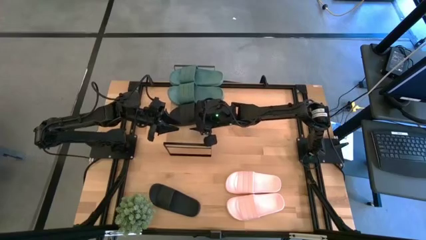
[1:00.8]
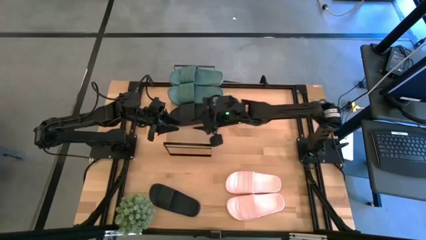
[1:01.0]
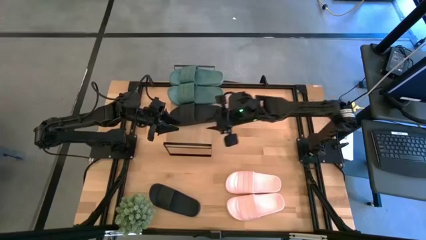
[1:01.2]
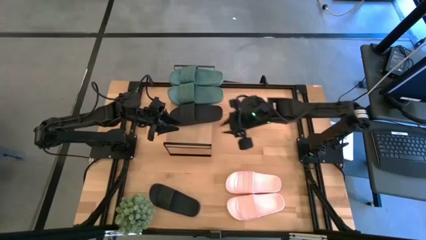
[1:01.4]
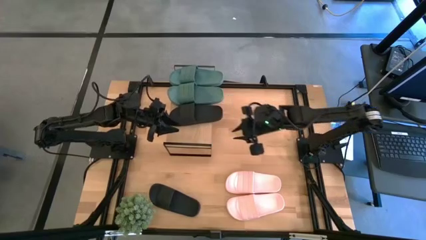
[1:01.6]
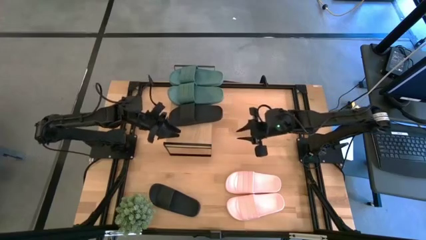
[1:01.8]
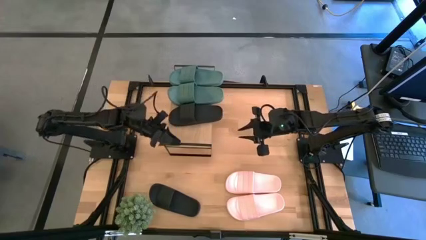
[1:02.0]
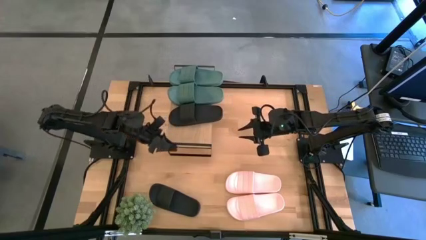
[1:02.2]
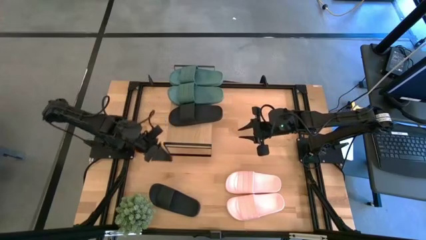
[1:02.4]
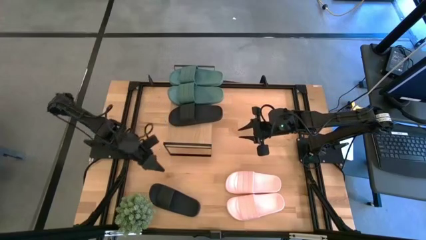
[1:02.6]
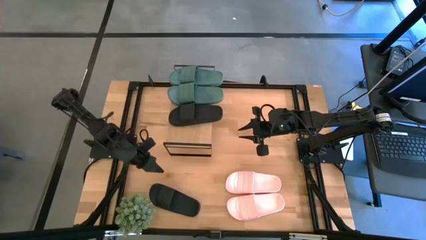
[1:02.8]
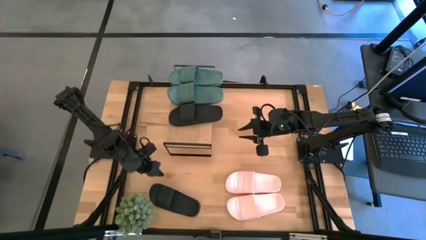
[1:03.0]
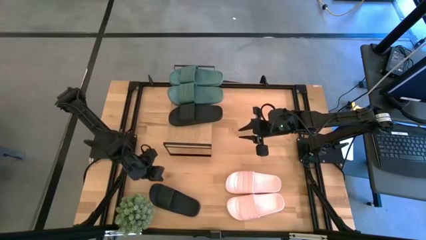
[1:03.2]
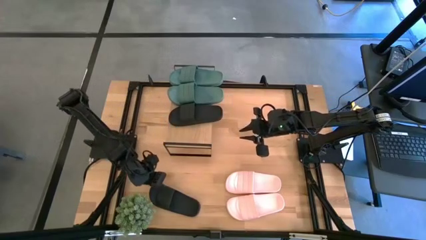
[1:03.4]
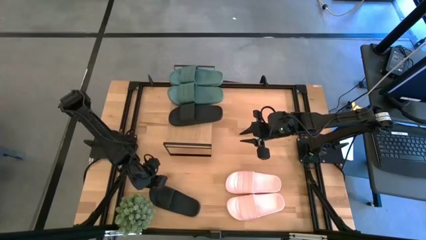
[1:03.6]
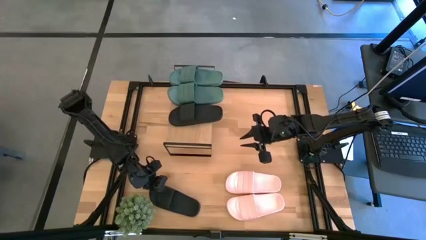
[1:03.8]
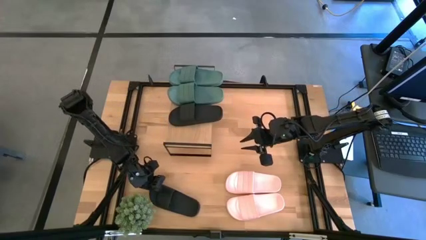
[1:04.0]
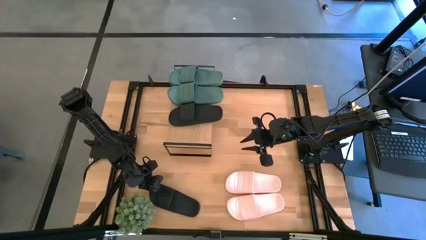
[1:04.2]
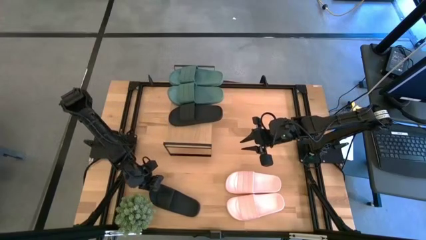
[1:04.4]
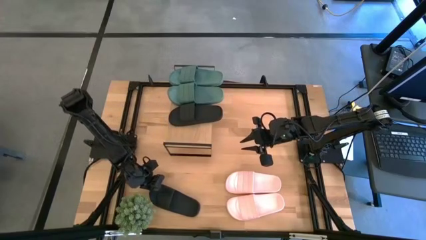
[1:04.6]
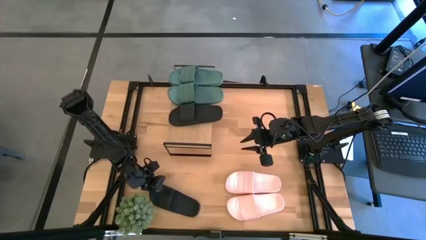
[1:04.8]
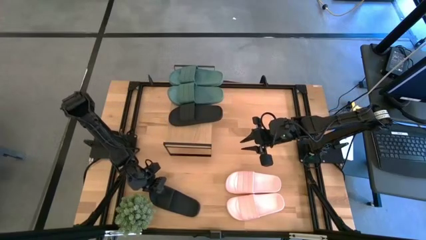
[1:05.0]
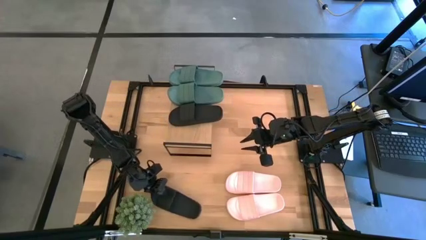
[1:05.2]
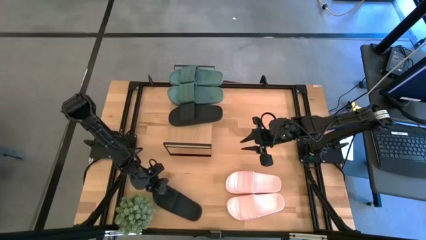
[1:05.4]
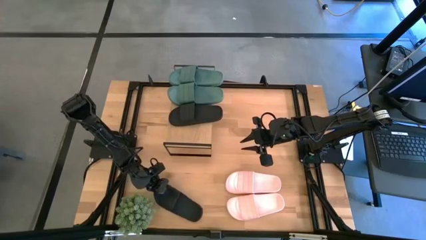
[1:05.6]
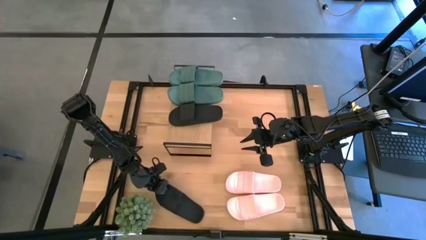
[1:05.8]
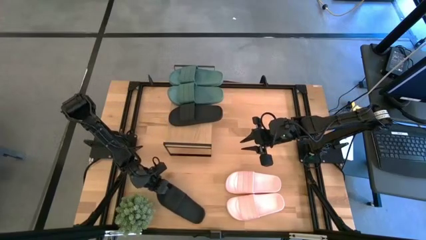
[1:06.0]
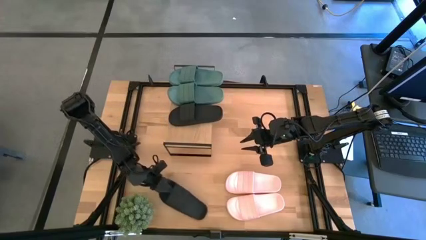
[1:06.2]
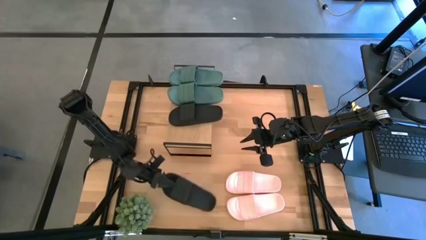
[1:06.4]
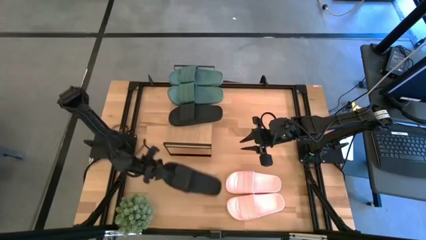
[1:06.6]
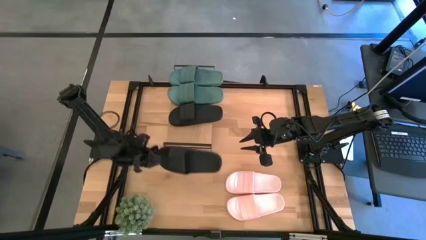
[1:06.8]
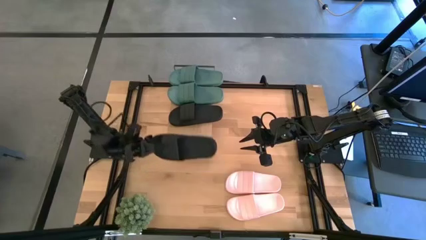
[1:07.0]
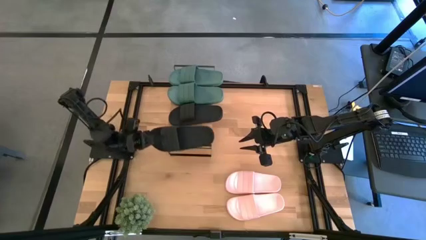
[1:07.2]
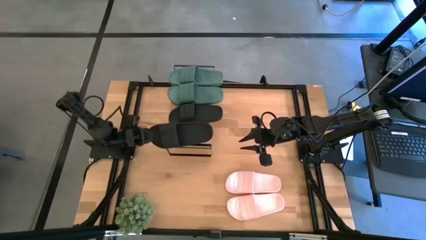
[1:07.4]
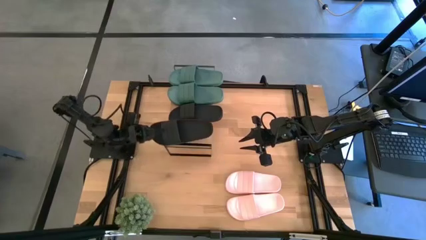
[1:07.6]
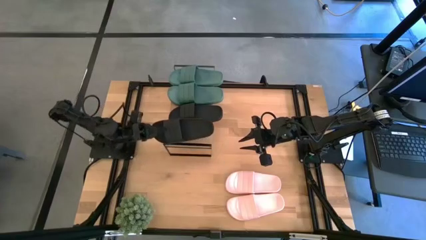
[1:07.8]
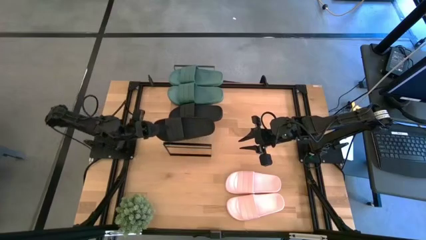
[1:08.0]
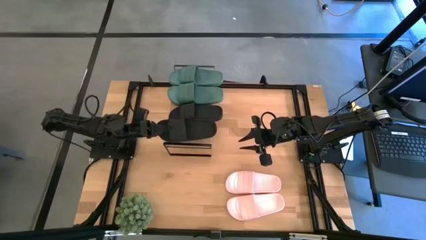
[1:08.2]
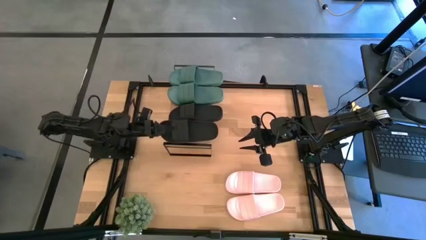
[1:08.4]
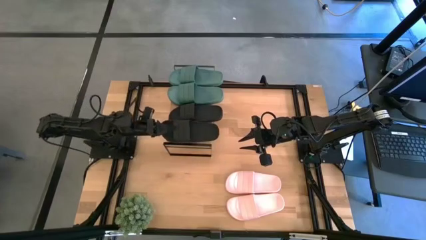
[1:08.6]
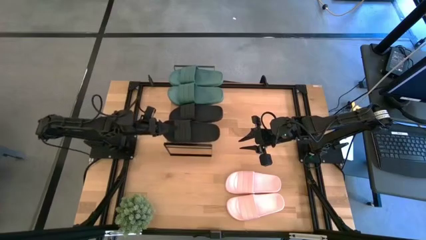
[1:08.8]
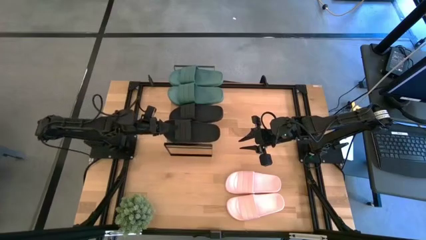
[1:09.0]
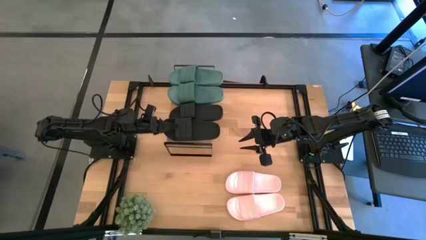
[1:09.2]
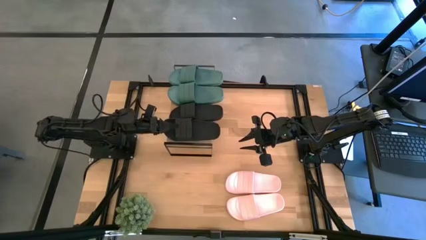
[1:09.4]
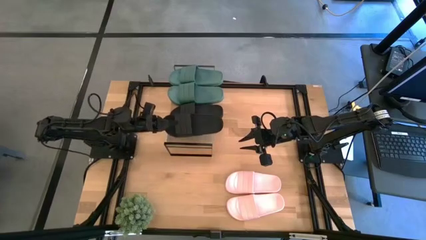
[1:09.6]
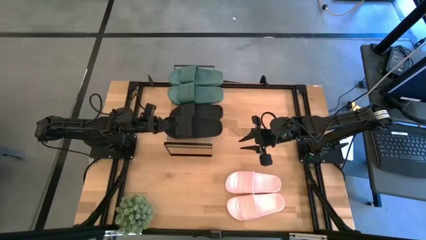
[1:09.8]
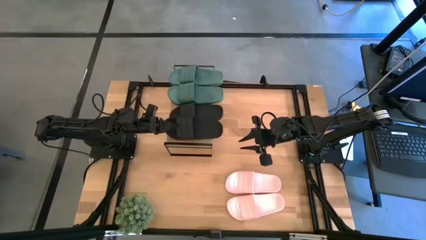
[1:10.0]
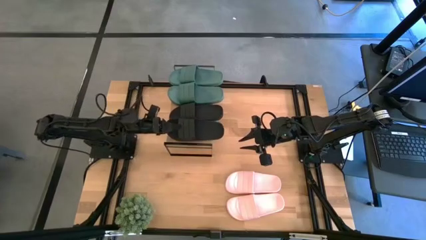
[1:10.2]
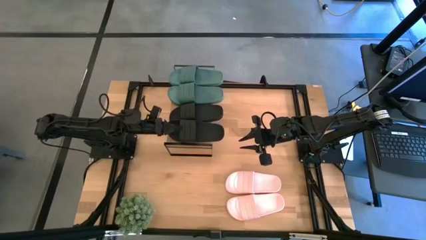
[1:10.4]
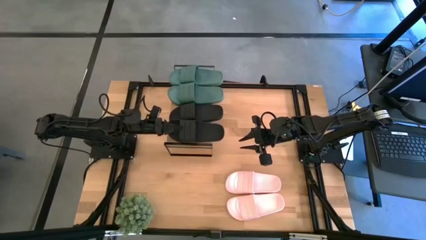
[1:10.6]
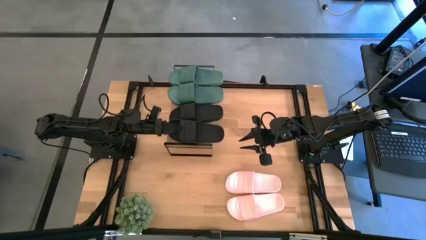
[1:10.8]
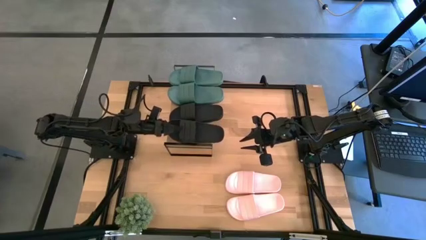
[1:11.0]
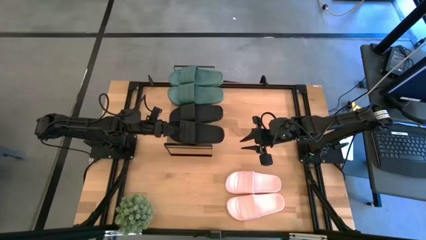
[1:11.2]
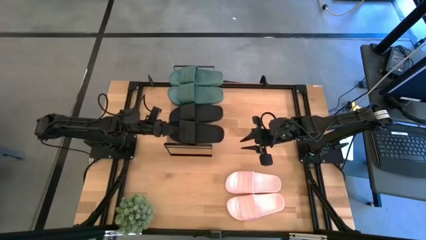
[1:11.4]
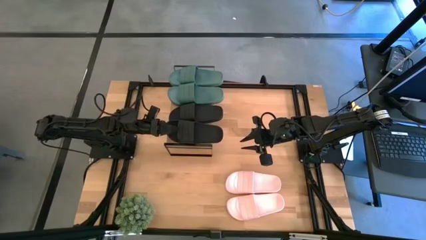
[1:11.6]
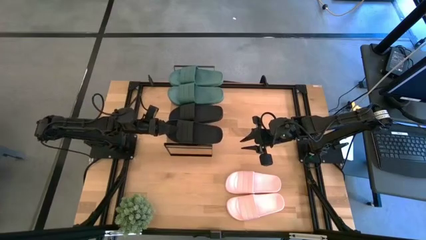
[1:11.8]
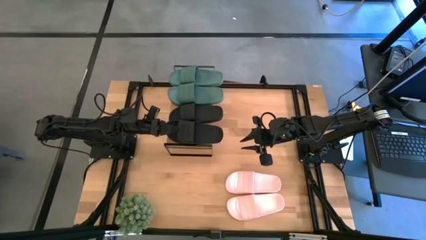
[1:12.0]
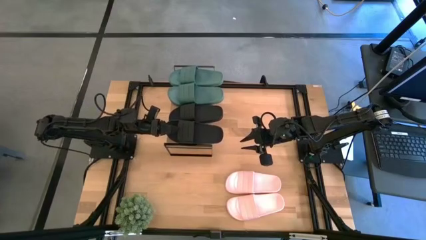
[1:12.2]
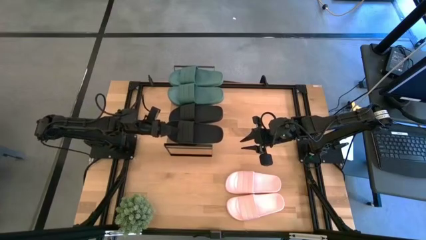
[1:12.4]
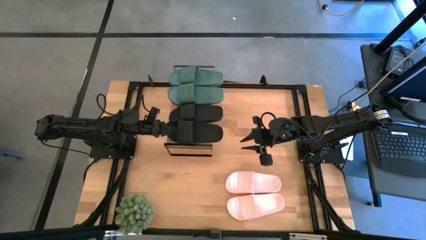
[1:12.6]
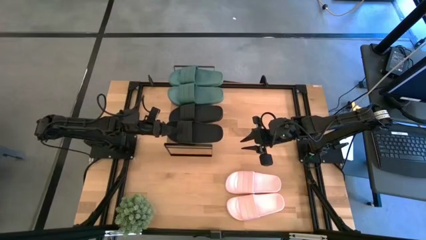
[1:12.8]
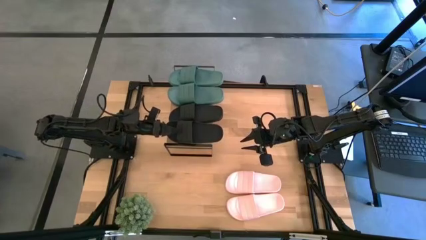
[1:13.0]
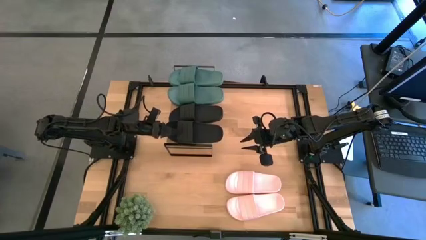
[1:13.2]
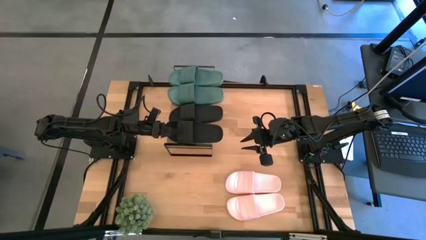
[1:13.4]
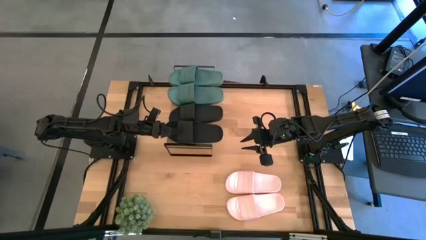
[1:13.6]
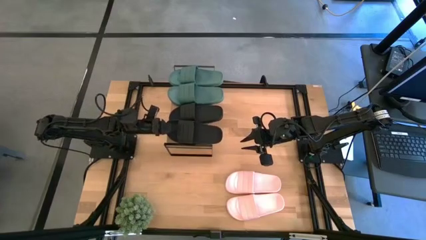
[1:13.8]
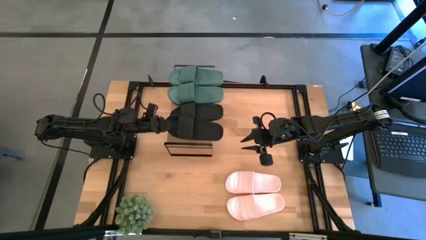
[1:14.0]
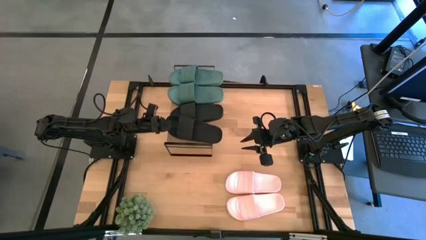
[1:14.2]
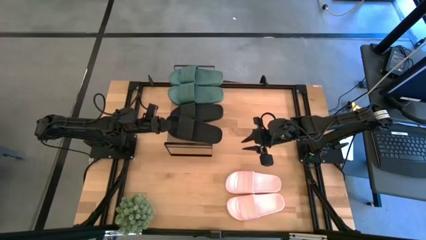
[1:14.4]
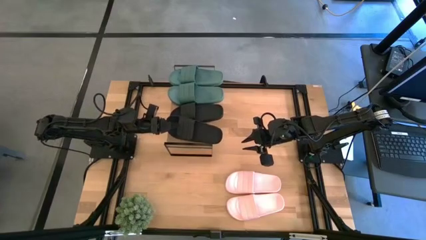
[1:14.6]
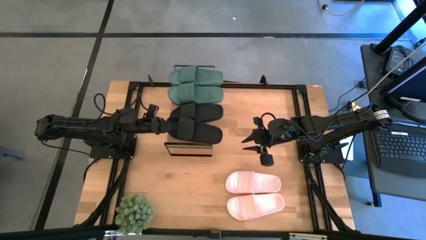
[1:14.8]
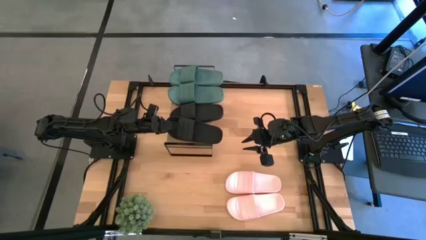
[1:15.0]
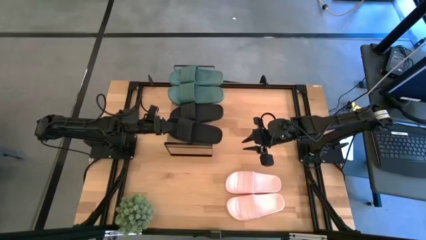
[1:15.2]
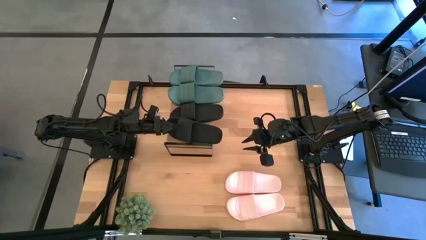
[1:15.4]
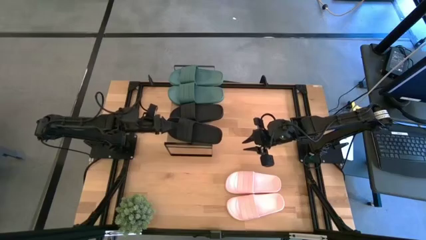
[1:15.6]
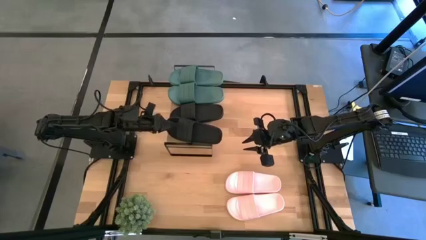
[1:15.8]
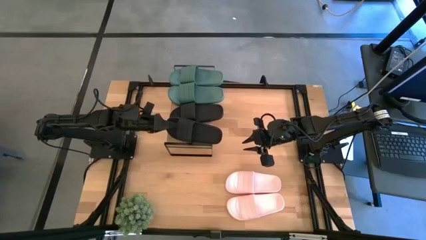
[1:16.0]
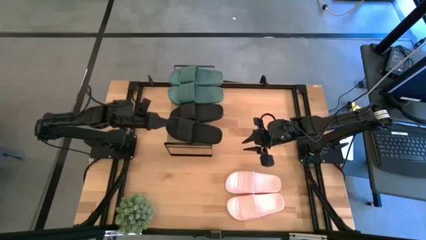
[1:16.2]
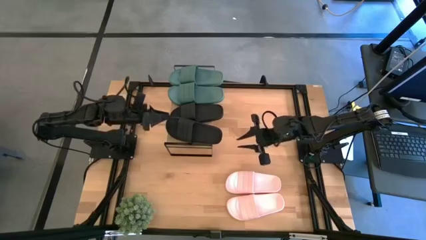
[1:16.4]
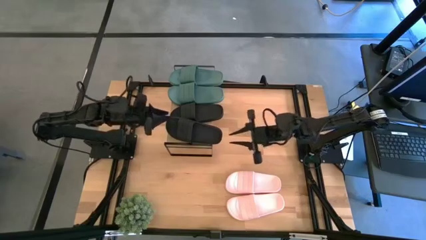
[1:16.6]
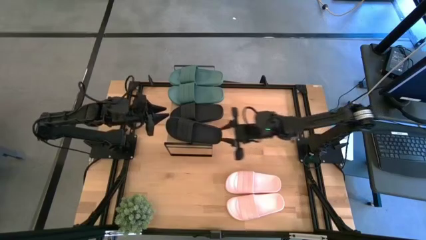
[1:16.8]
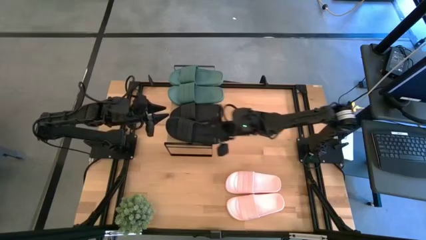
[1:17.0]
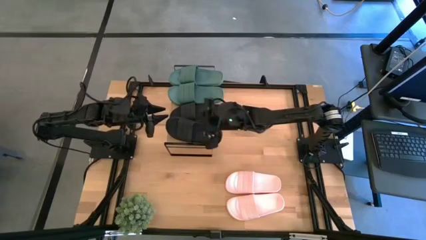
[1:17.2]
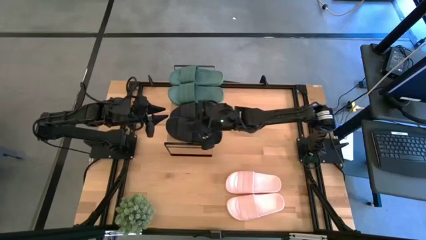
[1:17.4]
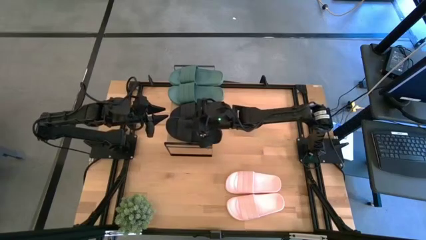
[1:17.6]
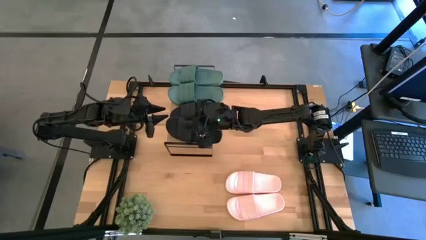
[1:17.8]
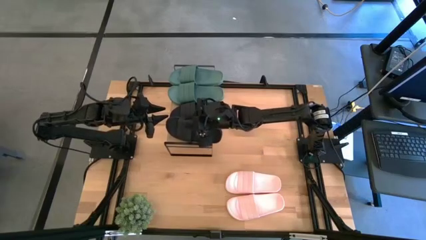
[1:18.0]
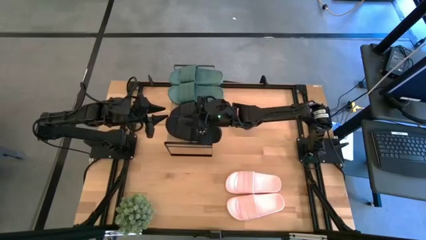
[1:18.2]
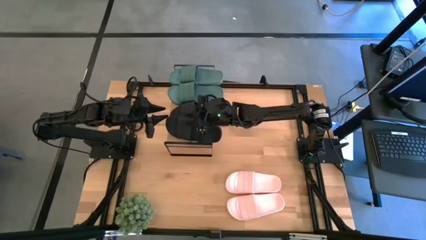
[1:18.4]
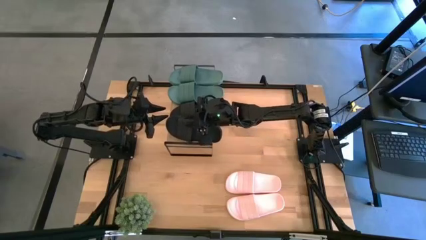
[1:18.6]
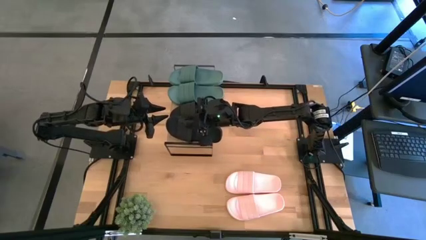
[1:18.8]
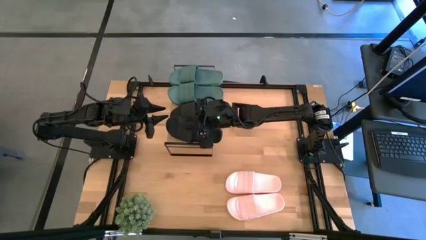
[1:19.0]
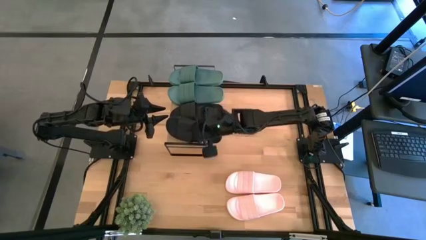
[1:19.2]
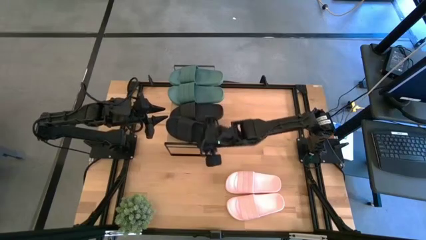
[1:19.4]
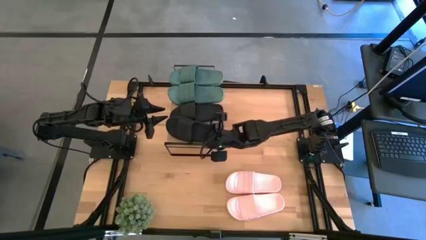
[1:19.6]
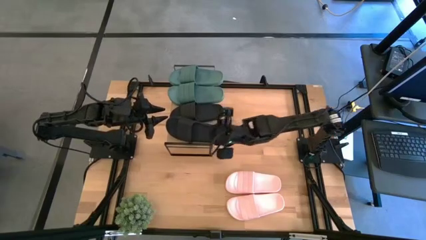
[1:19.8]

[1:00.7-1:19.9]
Task: Pick and place slides into the shelf
Put the black slipper on the shelf
